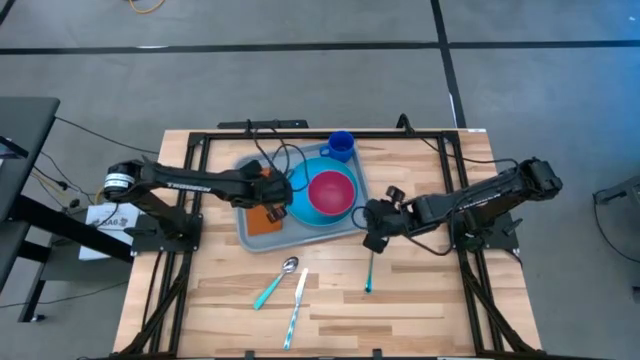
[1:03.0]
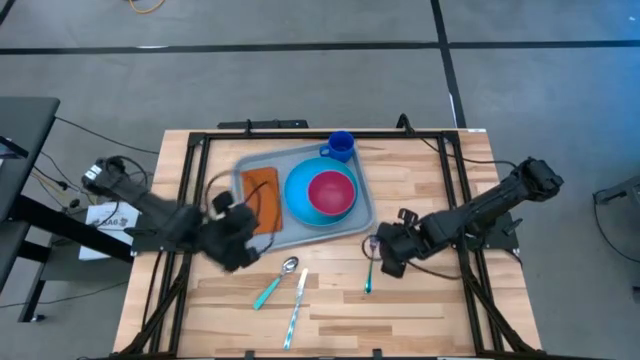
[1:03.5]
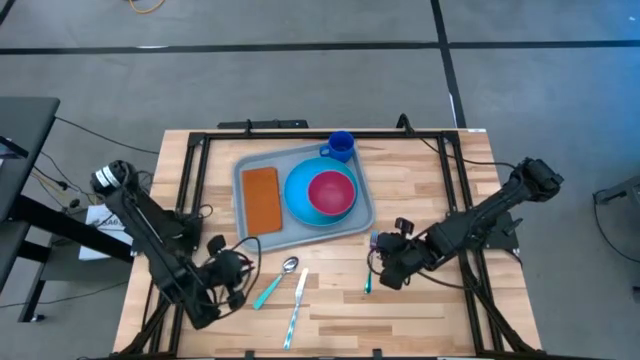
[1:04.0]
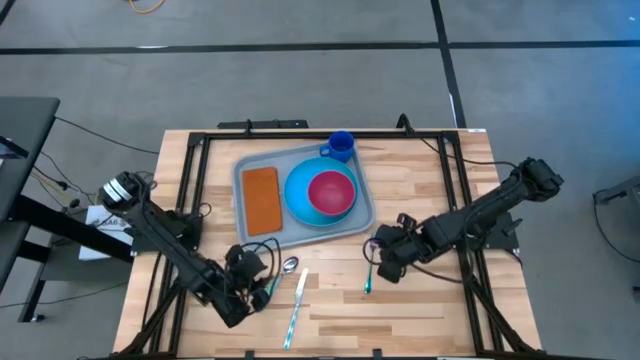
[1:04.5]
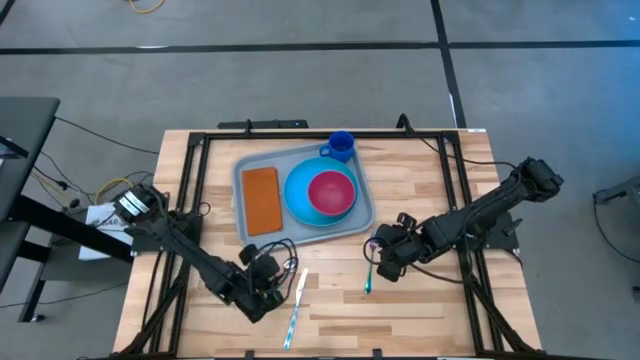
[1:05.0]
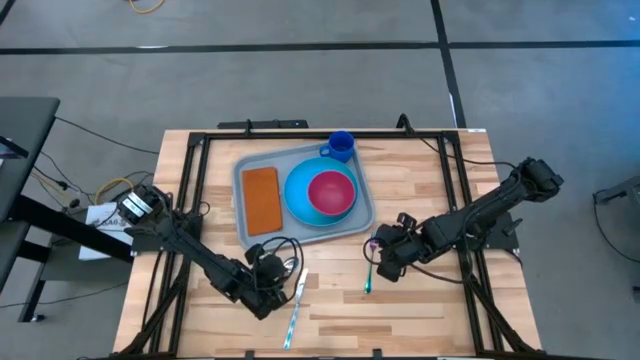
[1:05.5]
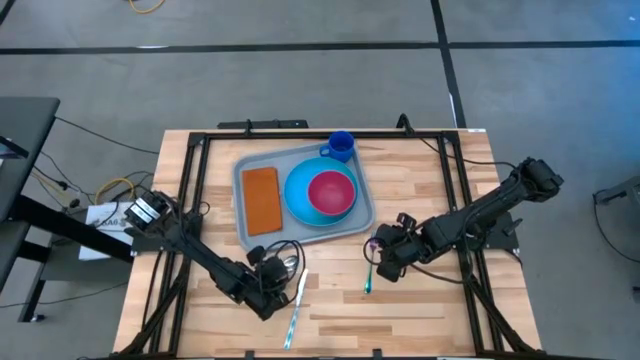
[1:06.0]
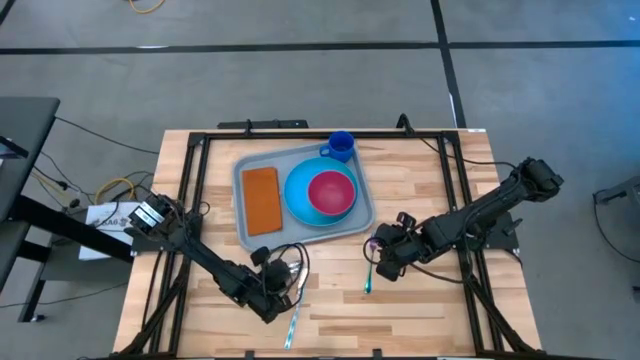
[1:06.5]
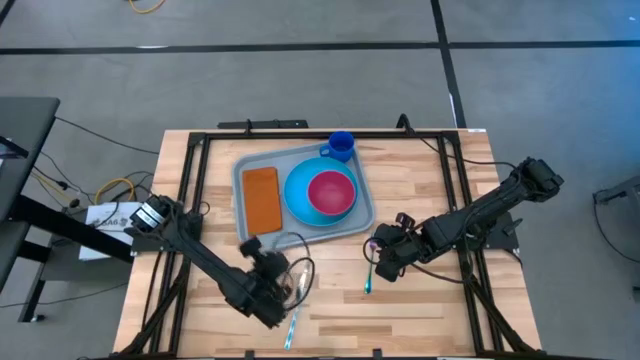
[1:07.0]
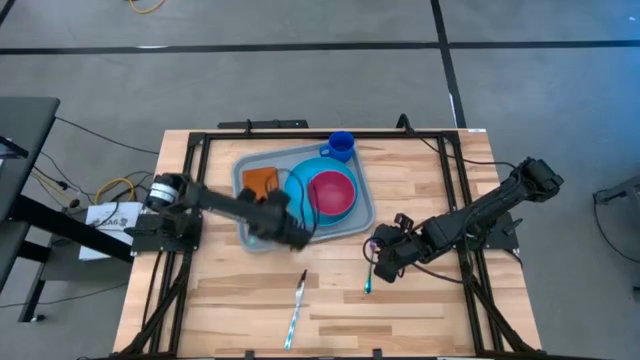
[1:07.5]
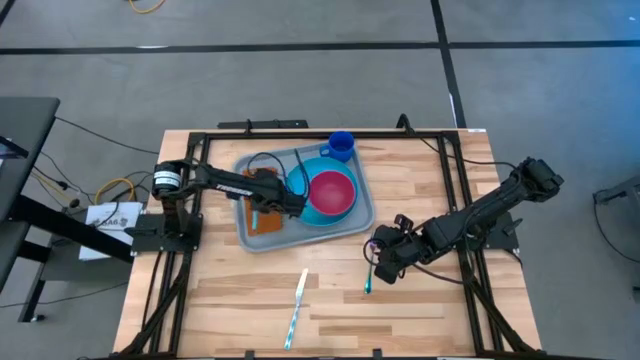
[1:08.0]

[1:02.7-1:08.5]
Task: Set up tray
Put the blue spoon on the brown napkin on the gray tray

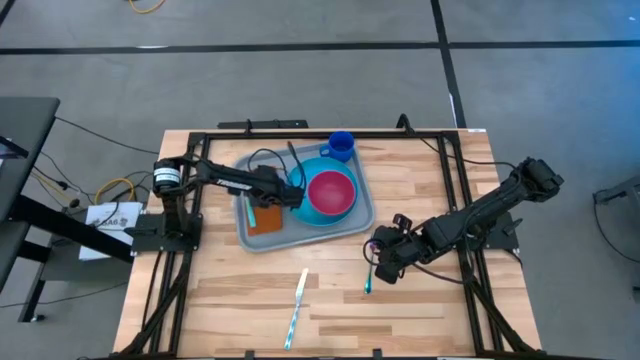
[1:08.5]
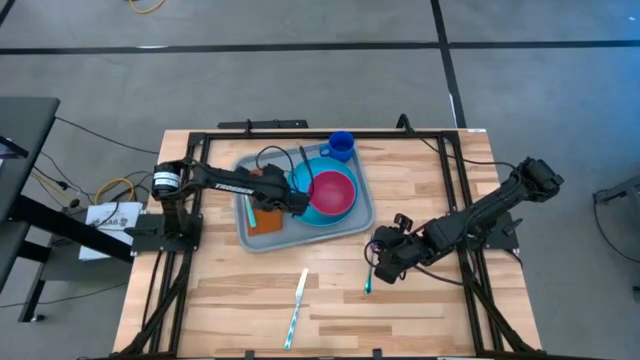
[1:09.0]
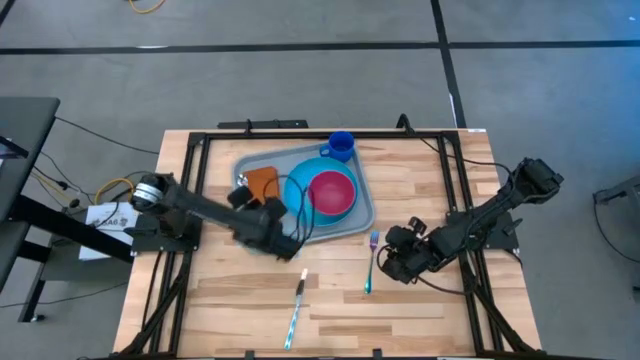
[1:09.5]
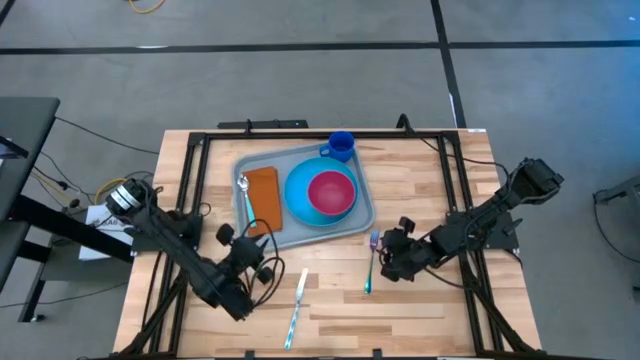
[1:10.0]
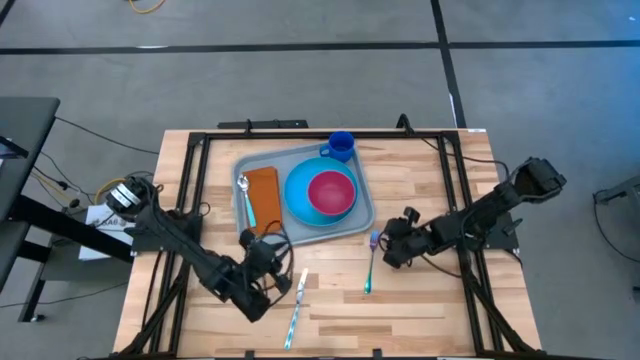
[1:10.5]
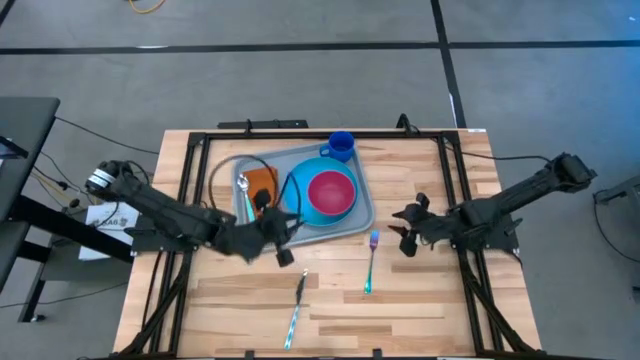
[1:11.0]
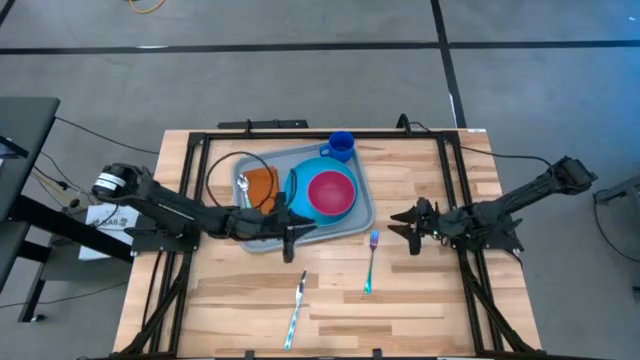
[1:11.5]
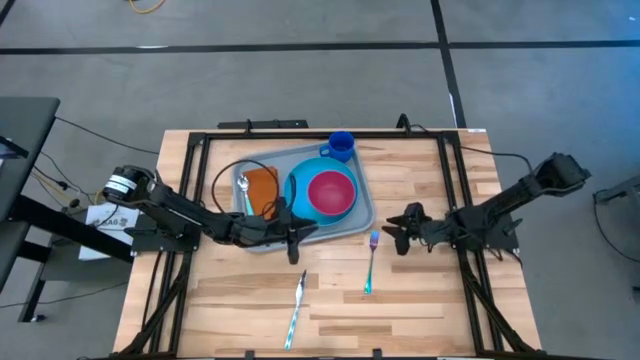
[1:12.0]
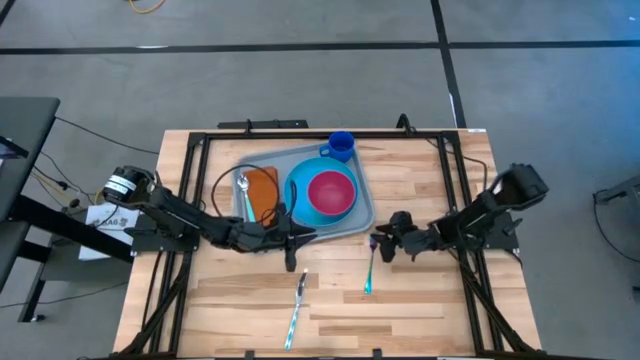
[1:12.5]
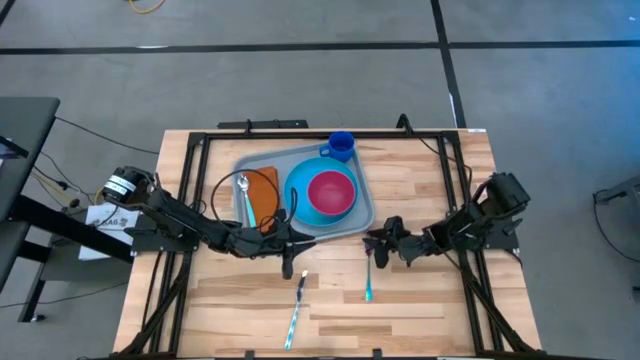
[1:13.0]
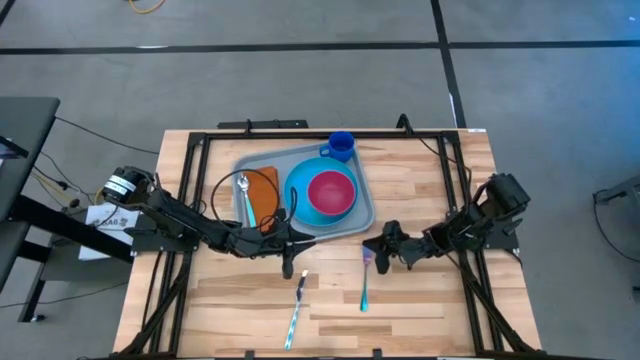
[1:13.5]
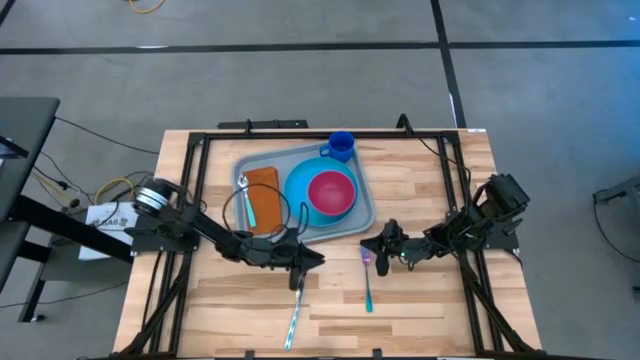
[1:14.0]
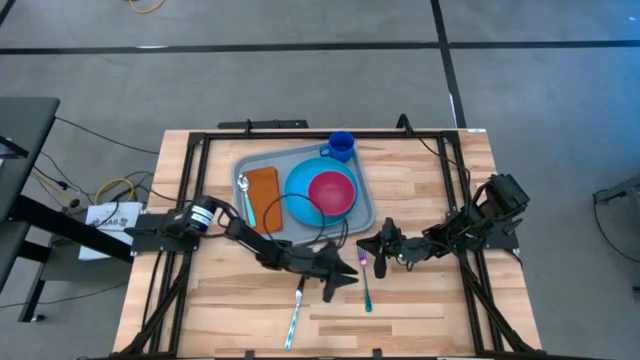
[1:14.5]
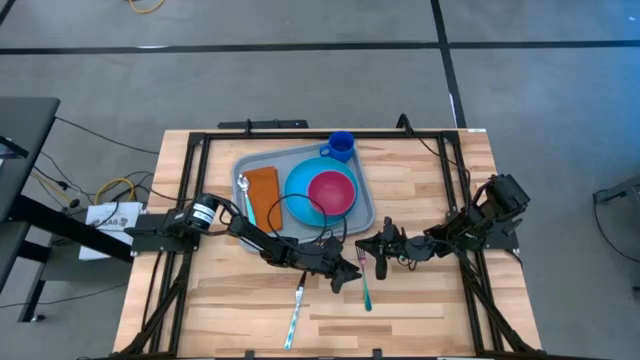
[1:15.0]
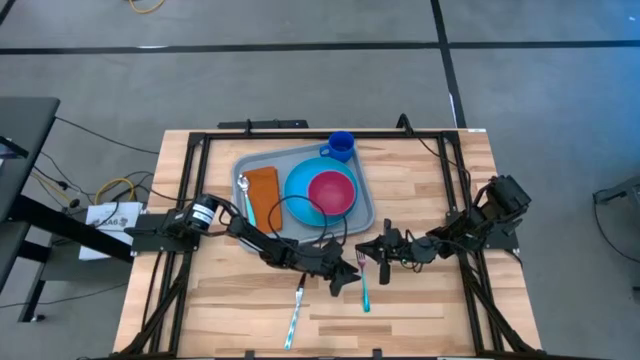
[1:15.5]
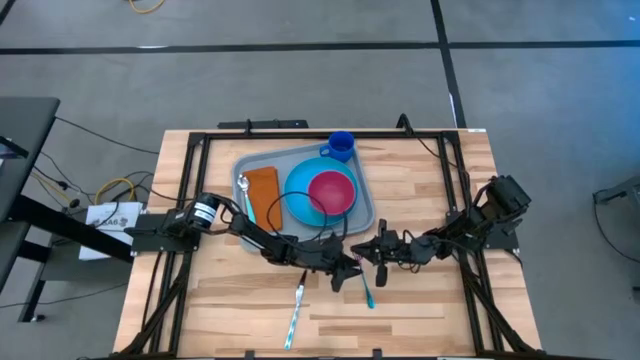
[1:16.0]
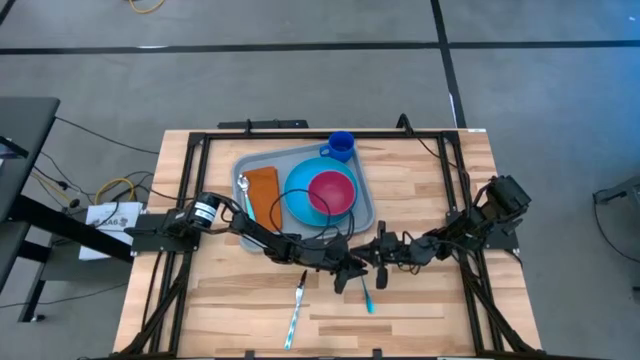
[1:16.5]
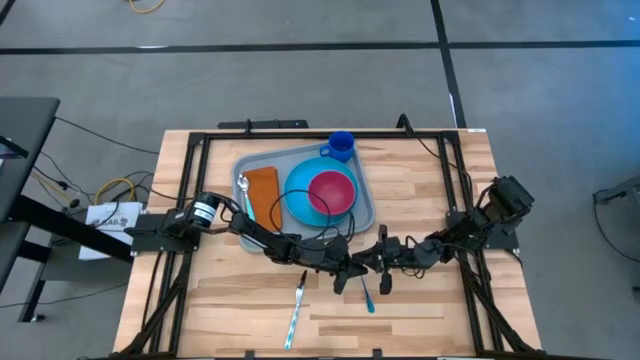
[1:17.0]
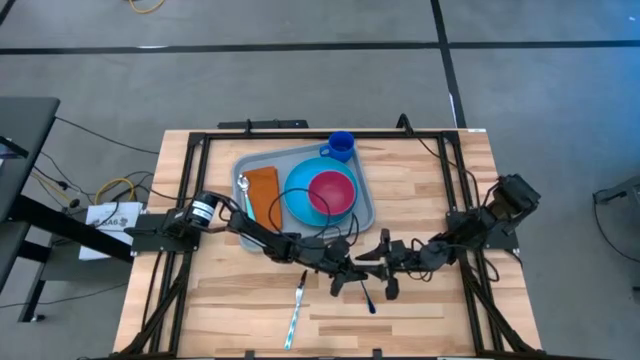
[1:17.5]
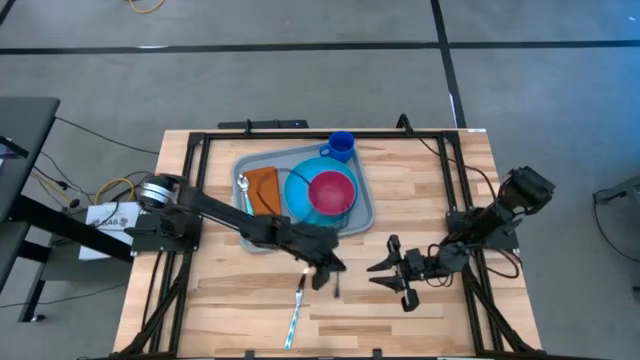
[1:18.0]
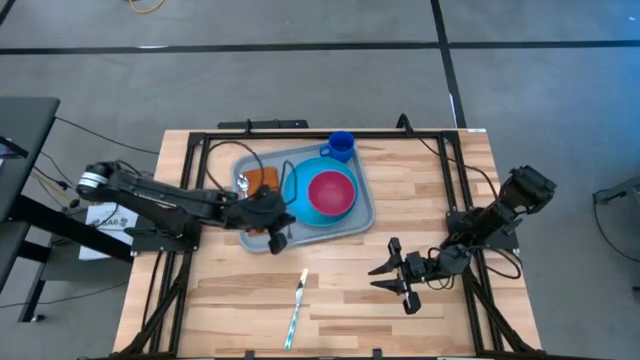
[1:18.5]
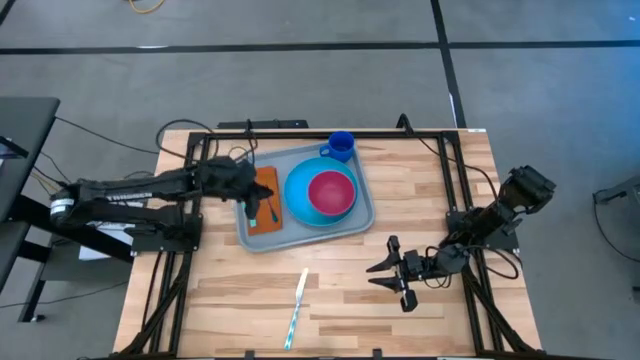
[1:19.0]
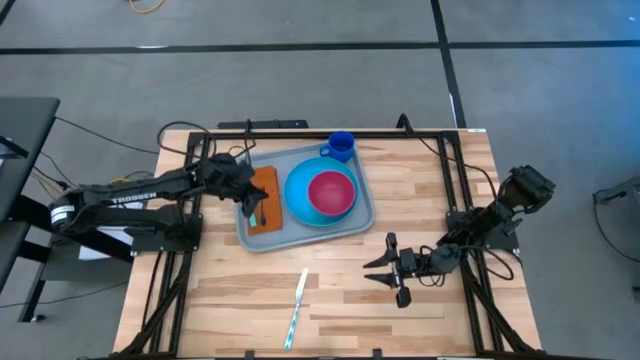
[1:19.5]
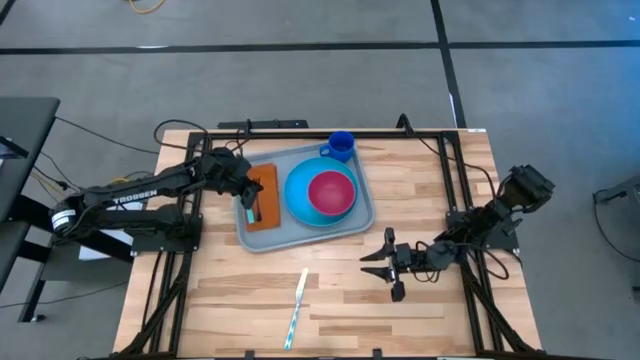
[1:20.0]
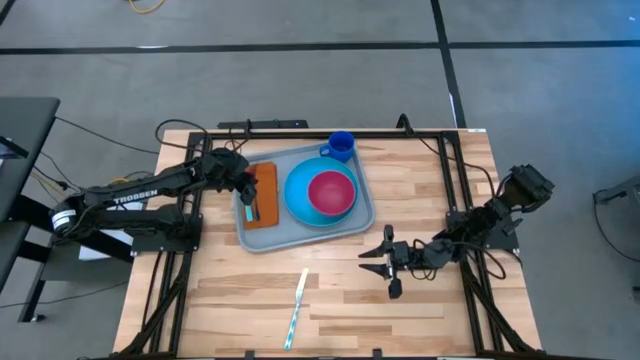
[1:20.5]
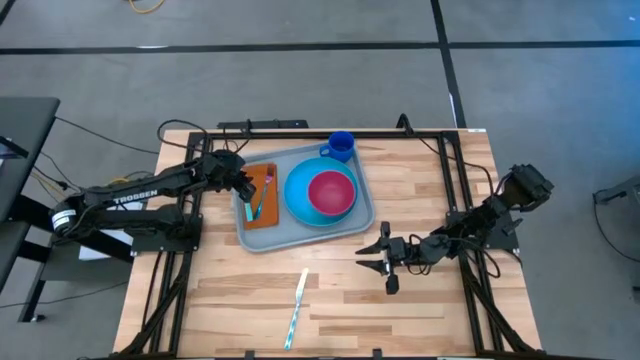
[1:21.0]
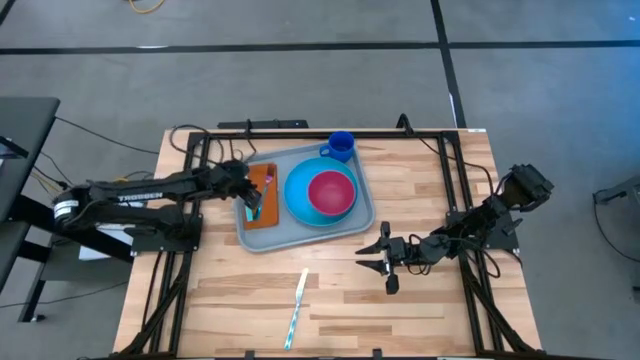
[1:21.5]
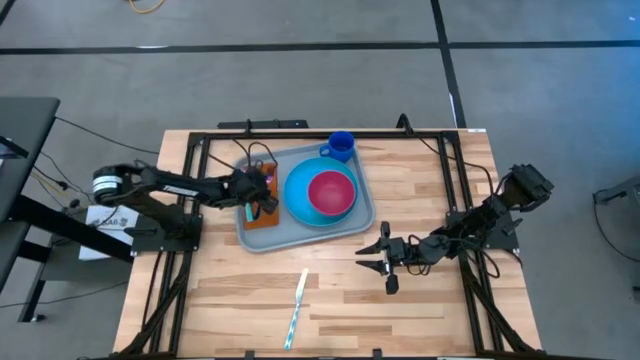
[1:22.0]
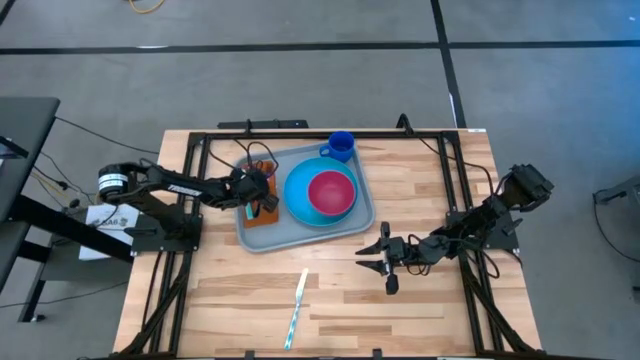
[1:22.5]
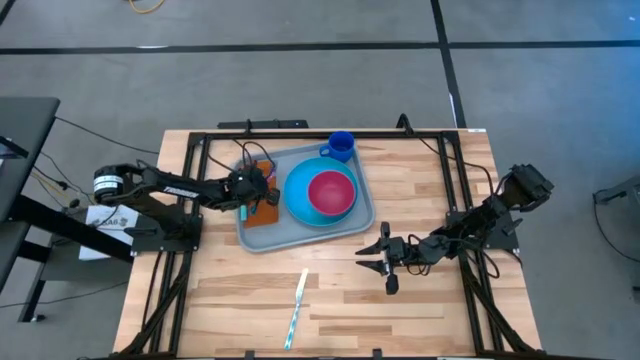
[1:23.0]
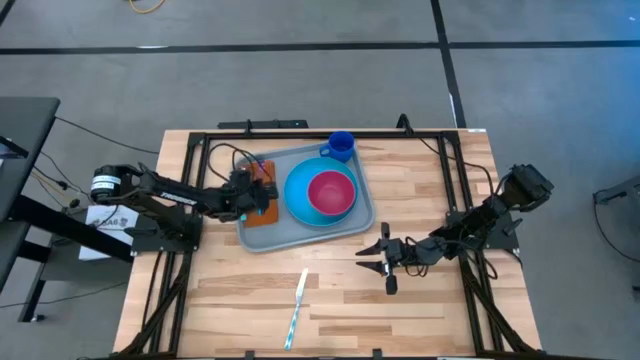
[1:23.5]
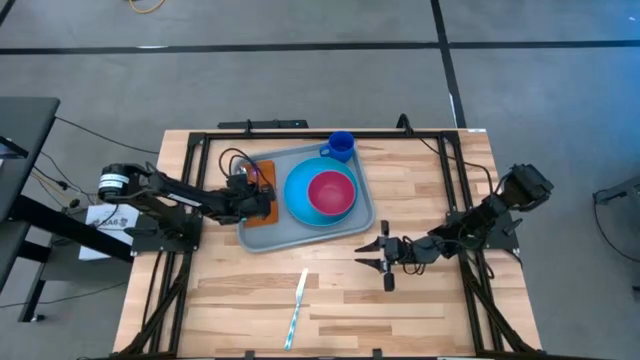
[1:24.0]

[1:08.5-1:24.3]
Put the purple fork on the brown napkin on the gray tray
